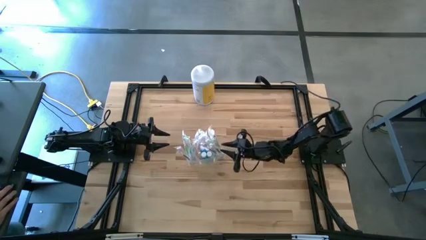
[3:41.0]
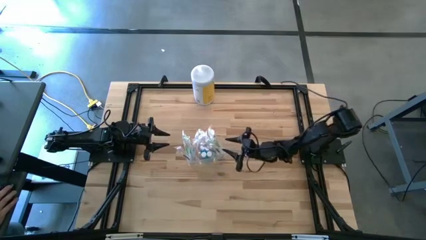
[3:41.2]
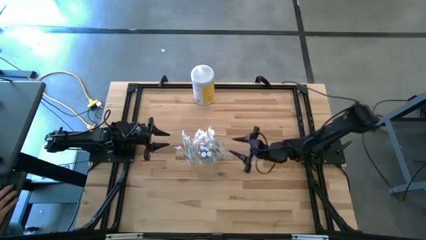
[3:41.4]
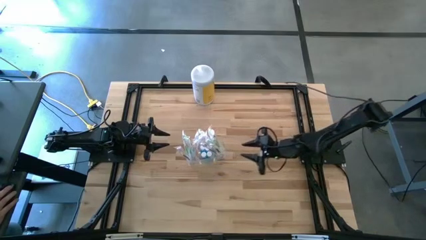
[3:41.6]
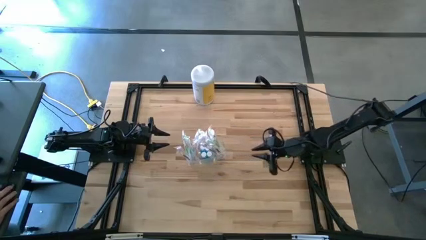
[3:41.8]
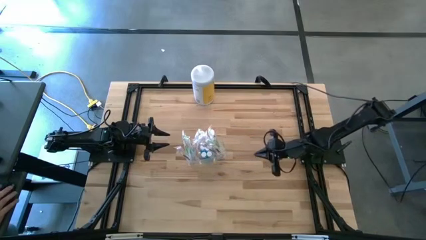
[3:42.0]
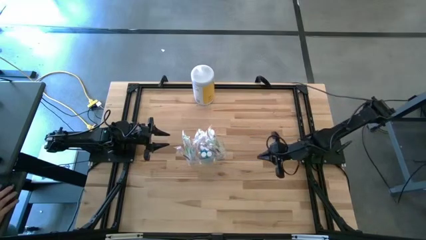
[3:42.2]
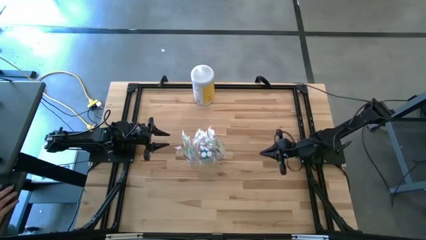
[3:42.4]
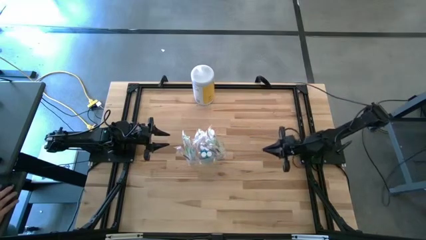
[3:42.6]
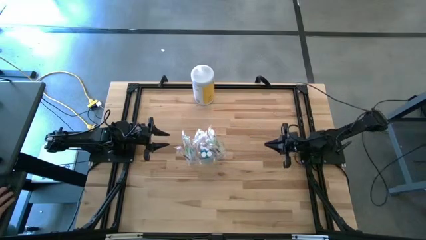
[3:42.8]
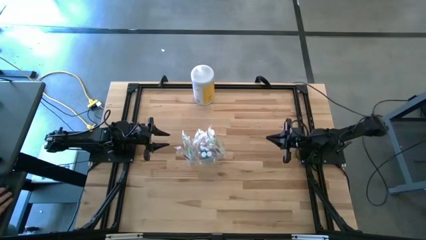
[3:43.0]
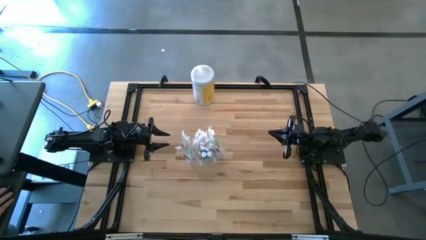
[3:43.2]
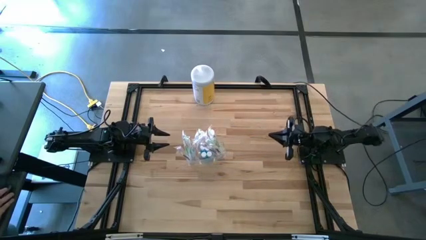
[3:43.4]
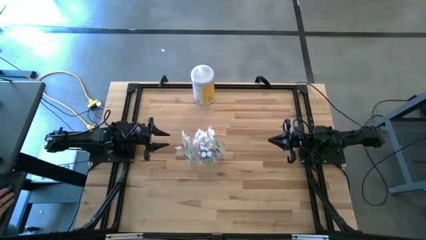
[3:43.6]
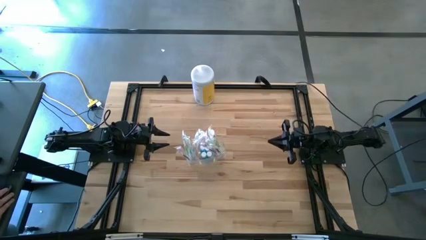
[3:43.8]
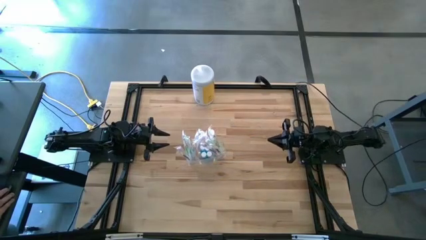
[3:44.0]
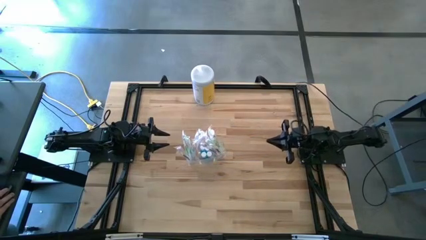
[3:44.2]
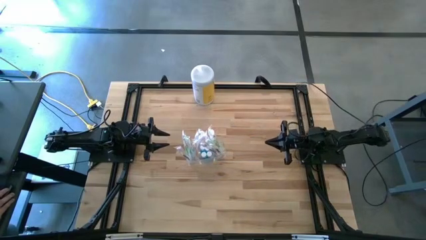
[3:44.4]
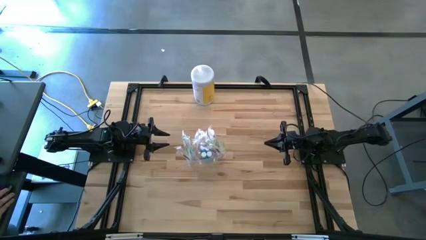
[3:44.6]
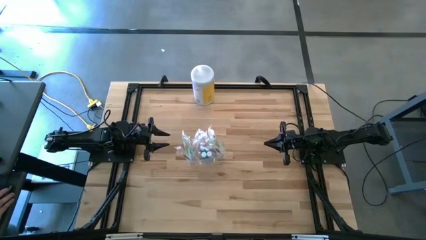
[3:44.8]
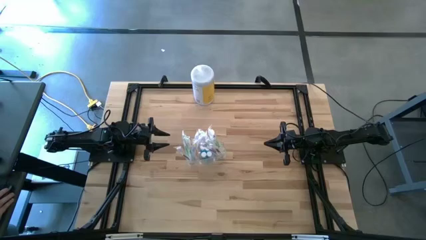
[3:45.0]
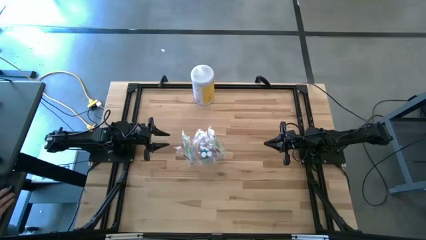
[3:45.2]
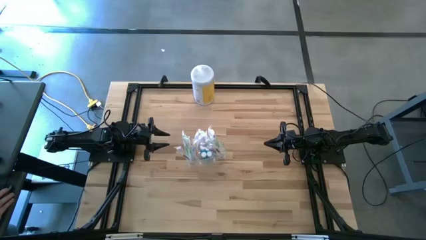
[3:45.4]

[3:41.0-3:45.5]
Task: Pick & Place toothbrushing station
Return to Home Position

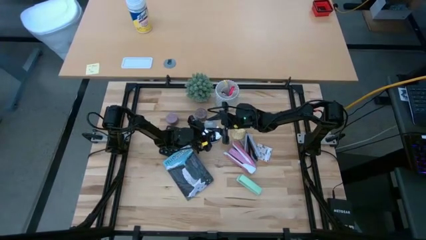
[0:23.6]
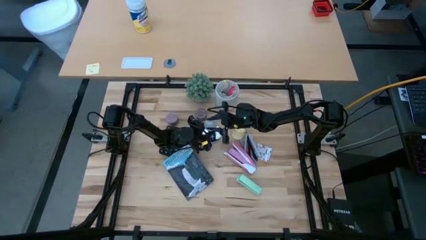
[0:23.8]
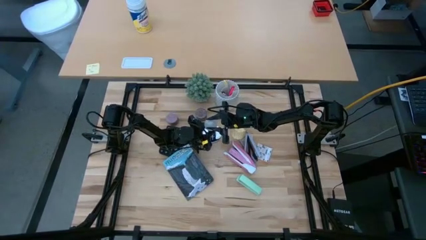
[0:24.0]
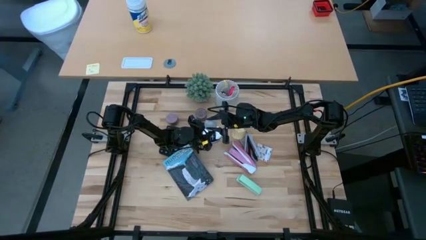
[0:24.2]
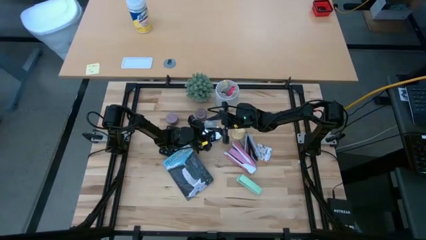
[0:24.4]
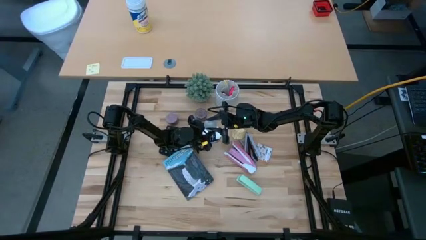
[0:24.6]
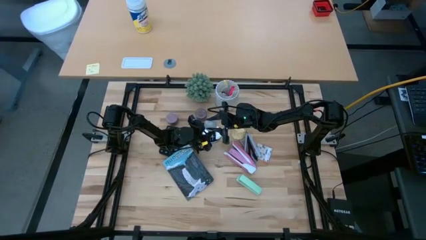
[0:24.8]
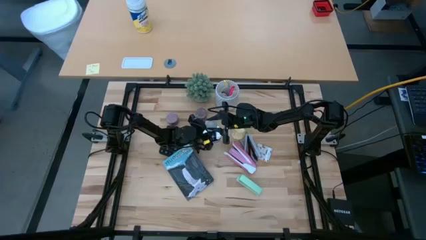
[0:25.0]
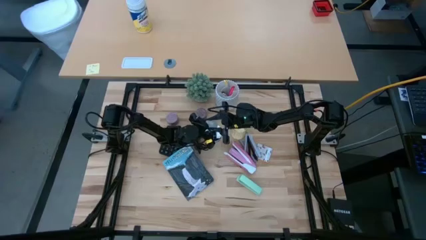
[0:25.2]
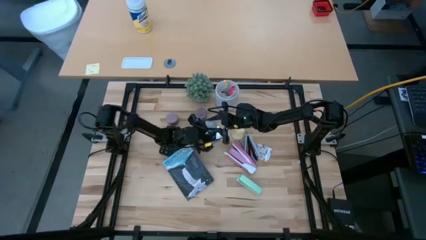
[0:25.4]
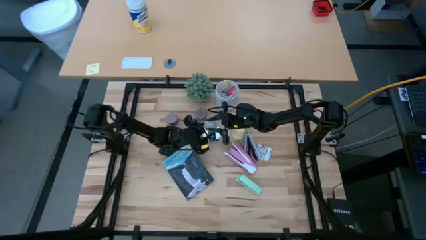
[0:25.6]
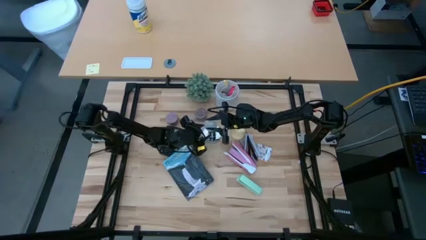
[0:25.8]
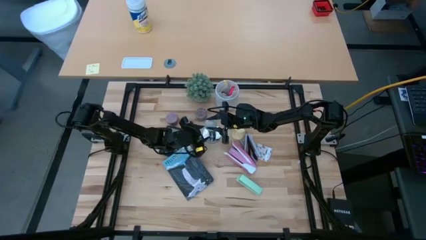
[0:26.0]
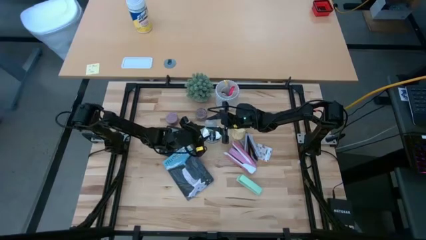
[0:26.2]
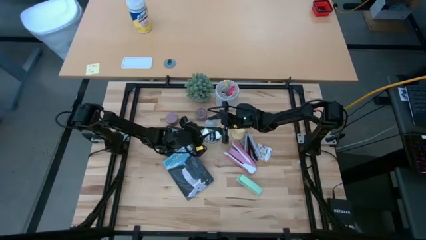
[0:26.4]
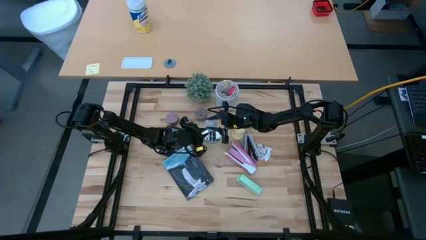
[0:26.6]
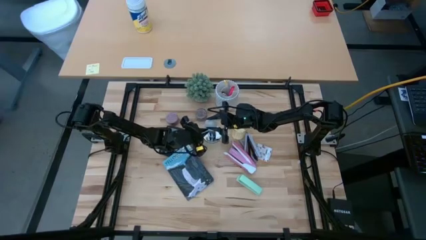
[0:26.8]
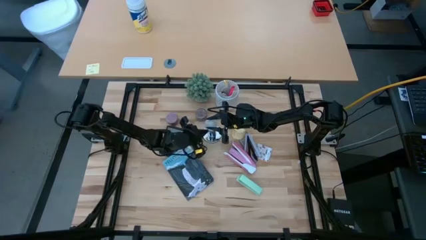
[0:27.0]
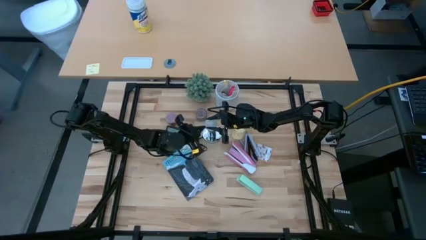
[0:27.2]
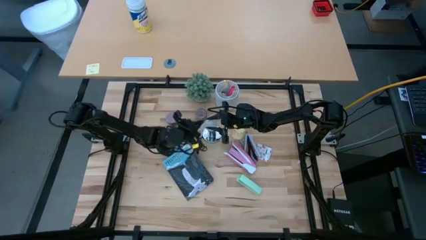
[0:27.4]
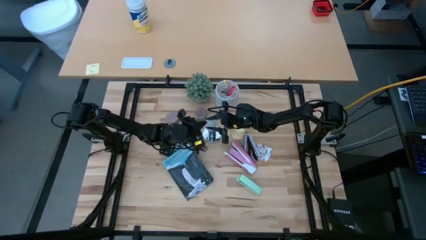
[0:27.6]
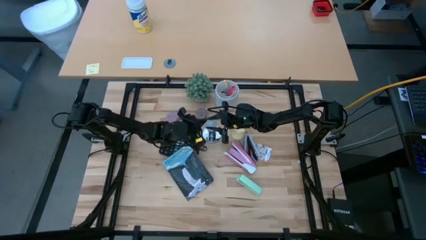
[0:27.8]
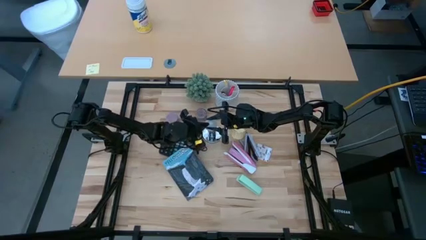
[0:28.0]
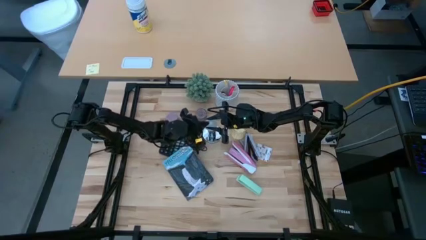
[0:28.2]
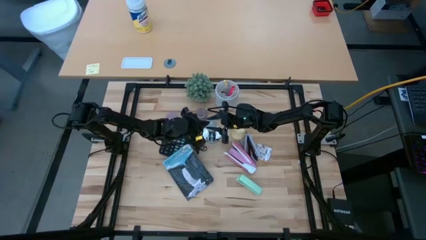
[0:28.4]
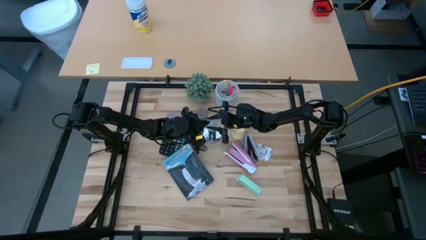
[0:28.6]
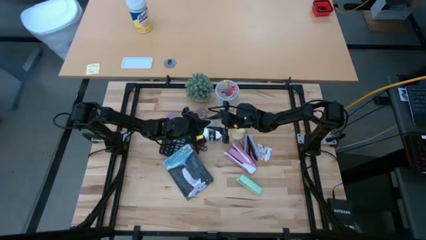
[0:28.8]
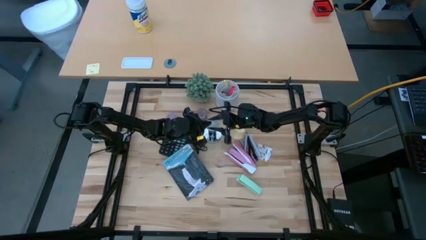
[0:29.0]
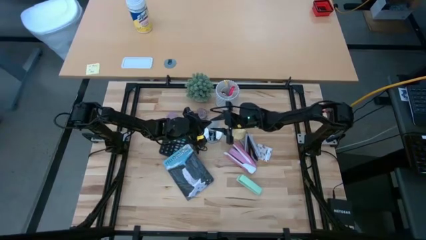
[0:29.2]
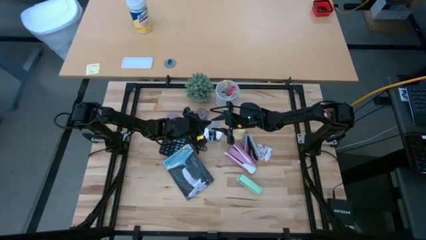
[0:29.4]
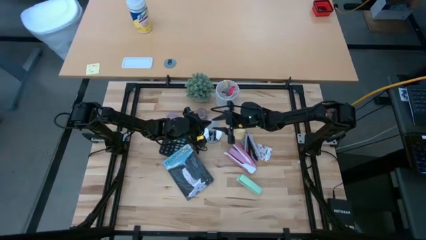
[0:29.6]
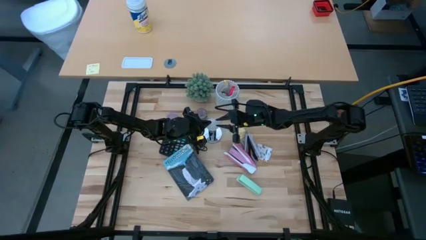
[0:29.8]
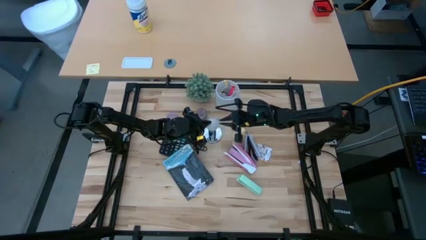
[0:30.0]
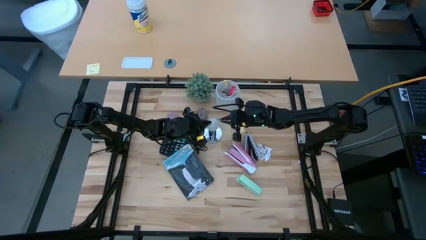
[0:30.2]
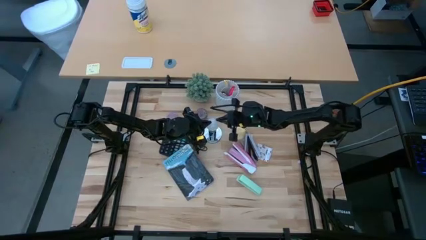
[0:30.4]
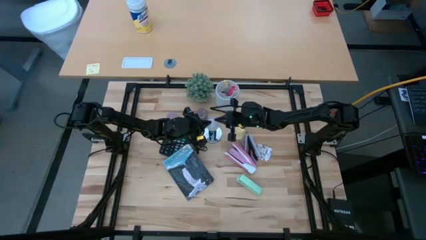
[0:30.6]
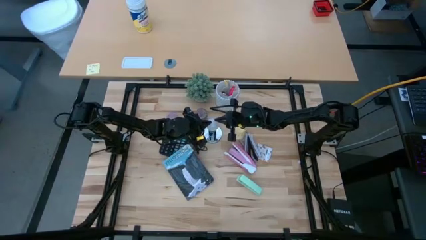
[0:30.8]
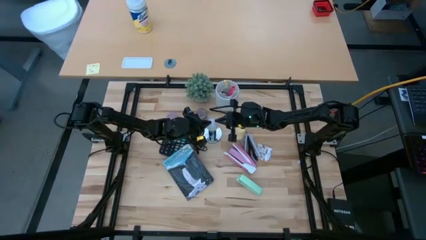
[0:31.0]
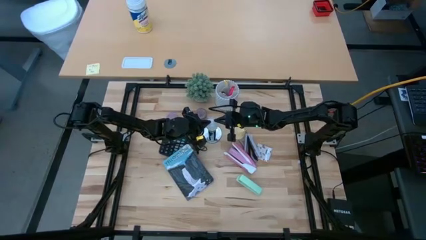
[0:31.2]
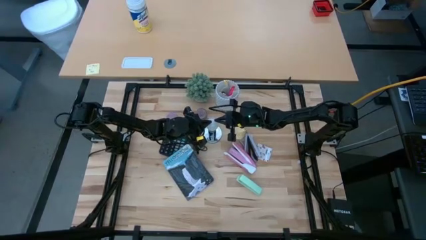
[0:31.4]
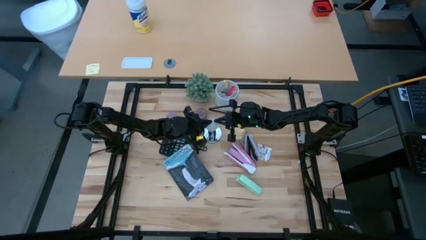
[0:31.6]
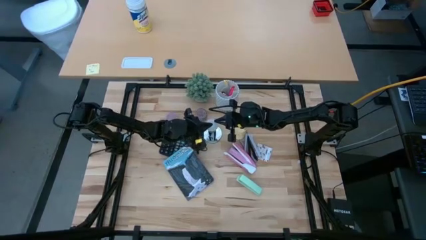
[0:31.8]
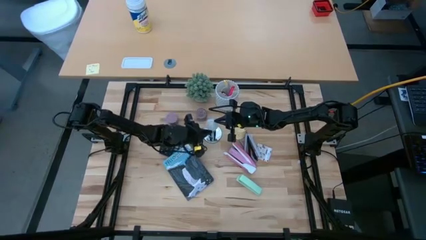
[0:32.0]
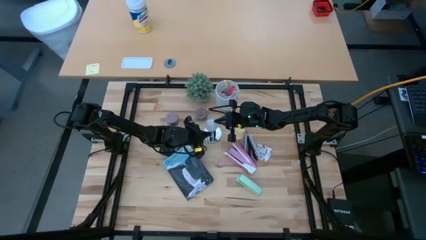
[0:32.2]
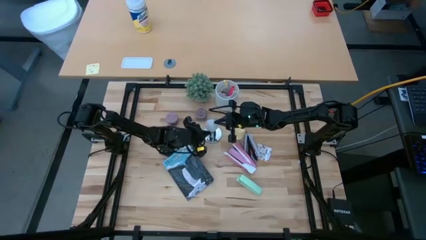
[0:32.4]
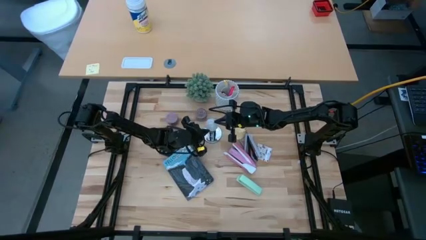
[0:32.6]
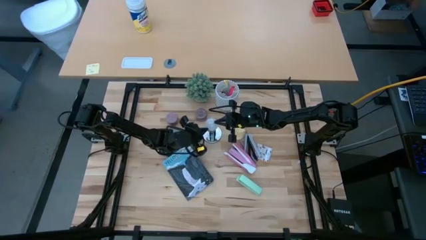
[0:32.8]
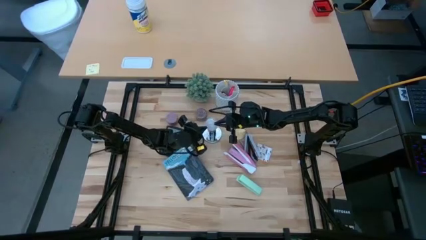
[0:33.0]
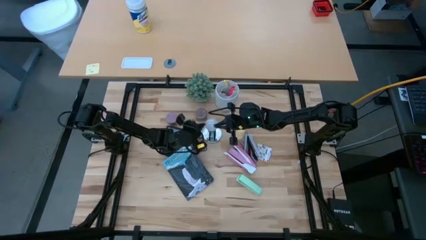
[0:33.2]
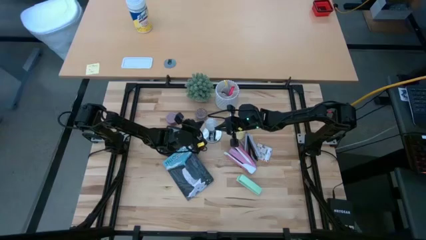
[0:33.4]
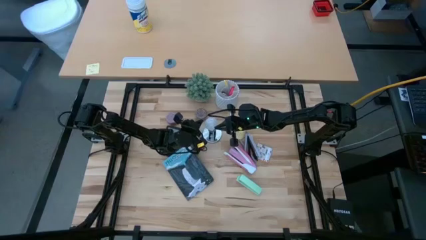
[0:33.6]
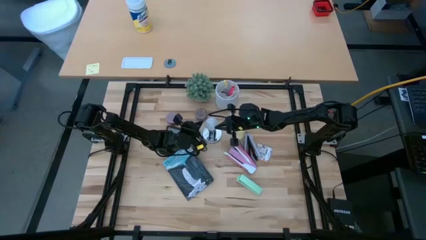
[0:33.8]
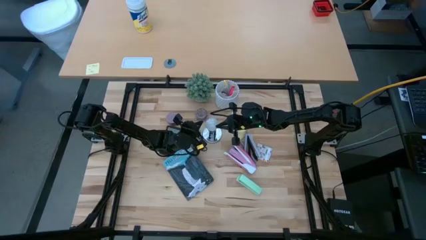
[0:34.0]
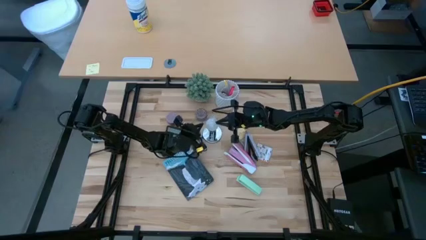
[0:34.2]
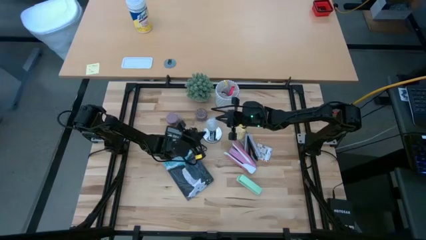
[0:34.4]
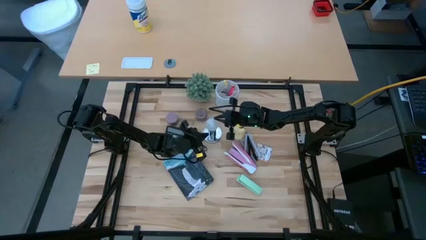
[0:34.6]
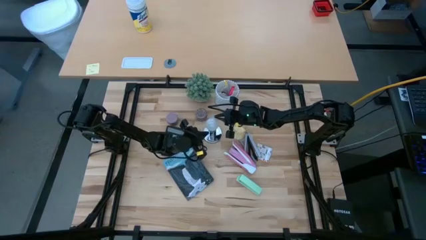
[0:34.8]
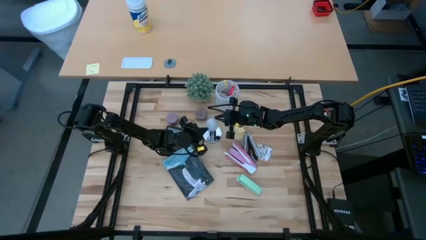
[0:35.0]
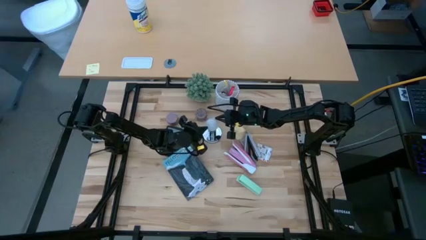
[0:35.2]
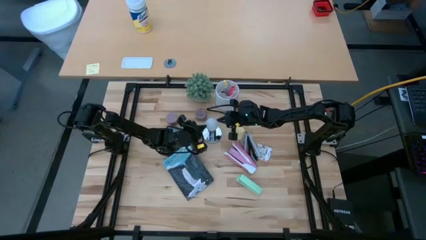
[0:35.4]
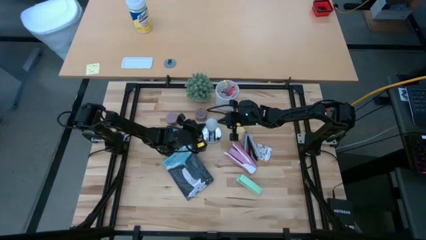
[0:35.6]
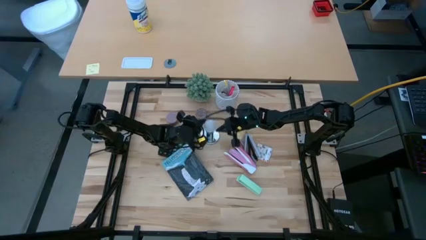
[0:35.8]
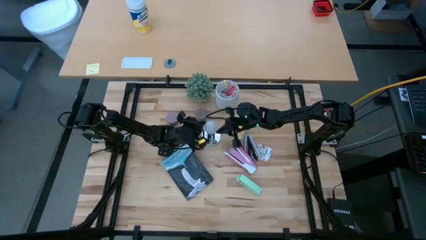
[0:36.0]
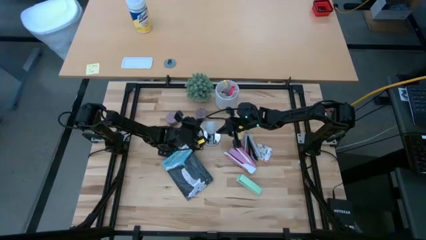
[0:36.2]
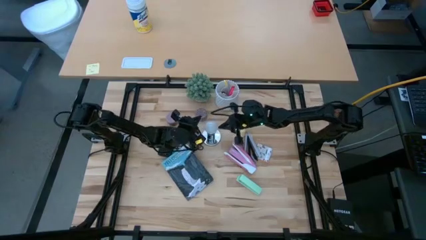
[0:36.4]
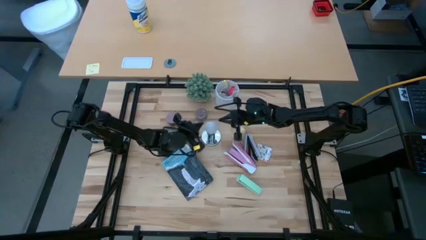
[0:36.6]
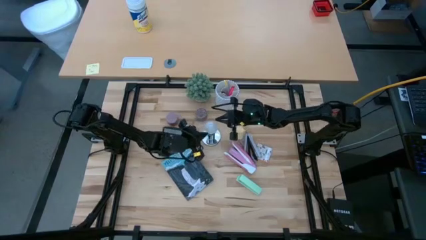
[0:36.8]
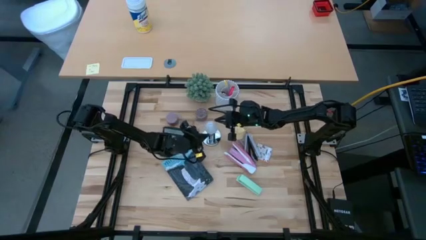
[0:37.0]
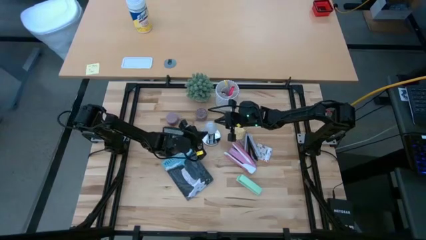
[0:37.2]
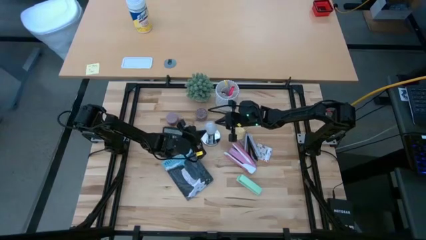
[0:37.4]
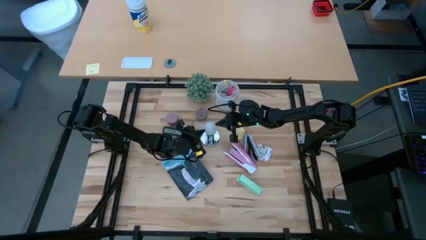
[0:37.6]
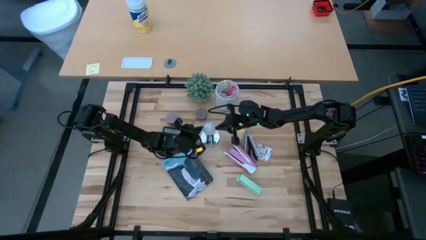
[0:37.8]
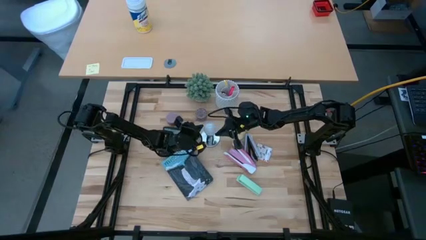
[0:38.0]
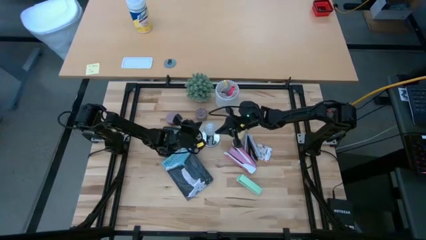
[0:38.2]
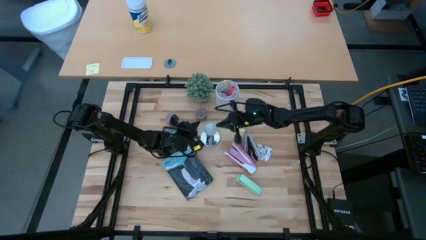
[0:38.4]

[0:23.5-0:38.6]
Task: Screw lightbulb
Insert the lightbulb into the lamp
